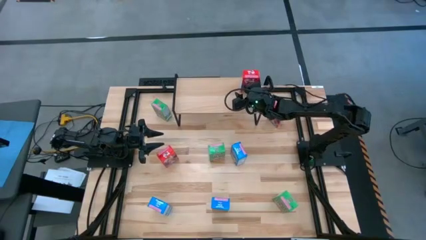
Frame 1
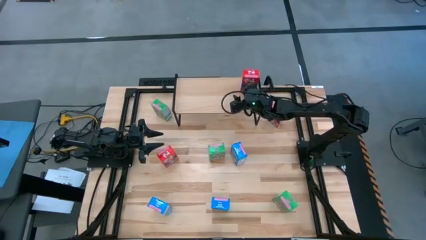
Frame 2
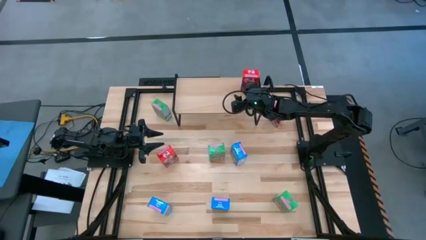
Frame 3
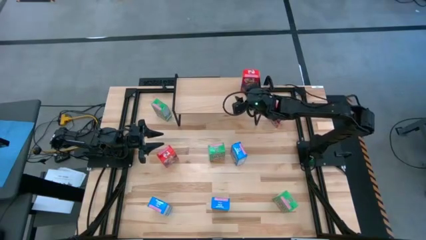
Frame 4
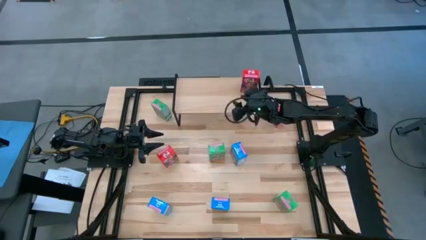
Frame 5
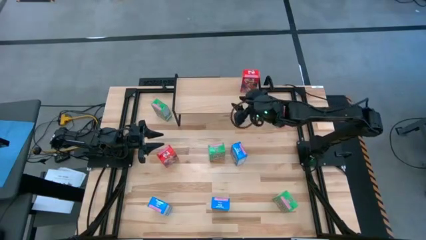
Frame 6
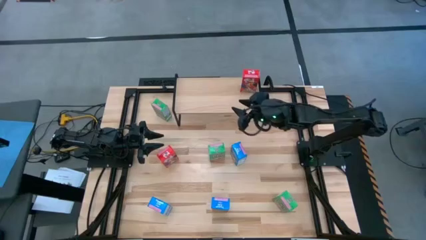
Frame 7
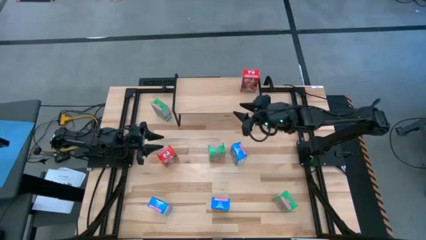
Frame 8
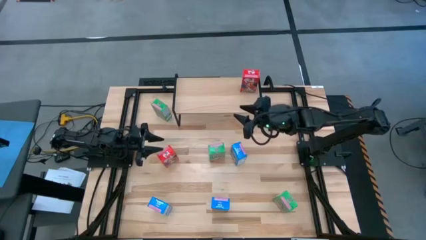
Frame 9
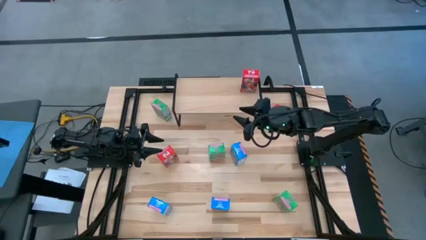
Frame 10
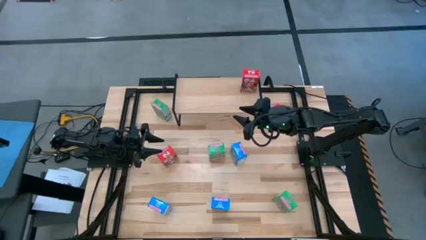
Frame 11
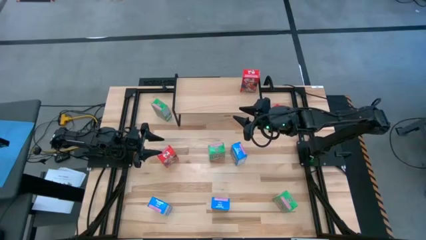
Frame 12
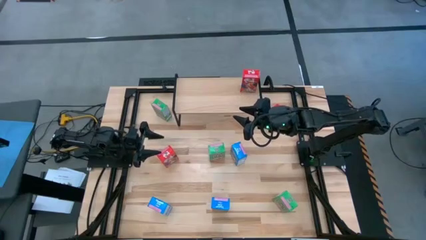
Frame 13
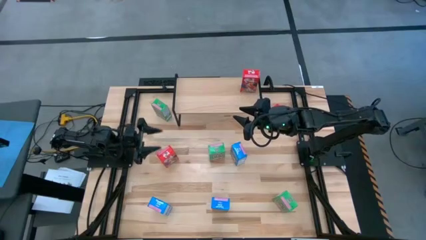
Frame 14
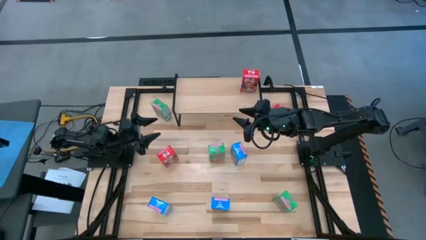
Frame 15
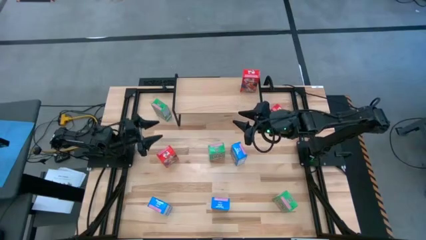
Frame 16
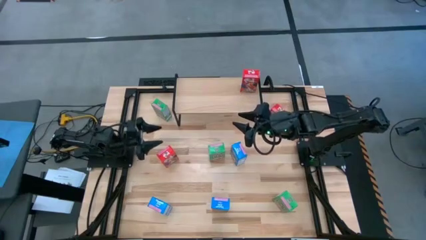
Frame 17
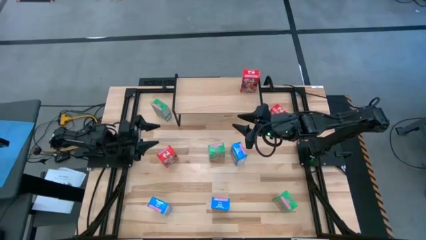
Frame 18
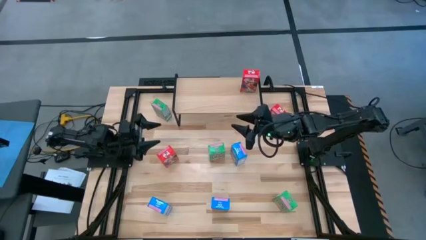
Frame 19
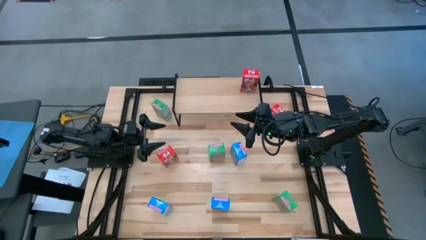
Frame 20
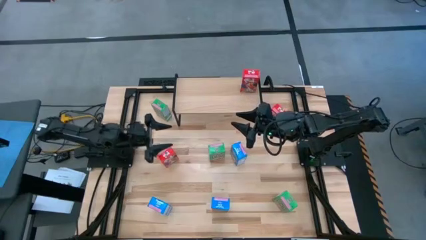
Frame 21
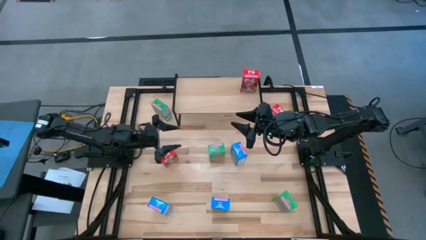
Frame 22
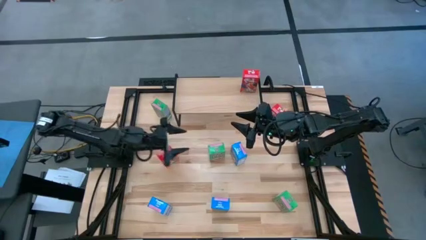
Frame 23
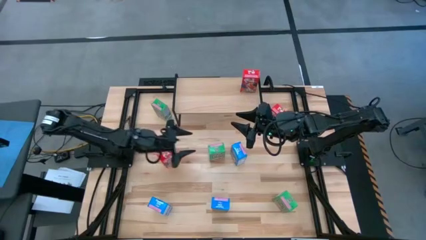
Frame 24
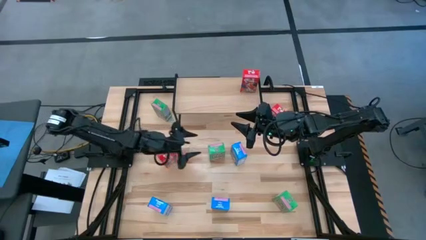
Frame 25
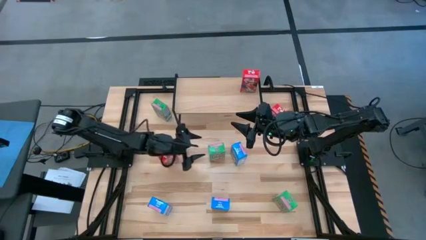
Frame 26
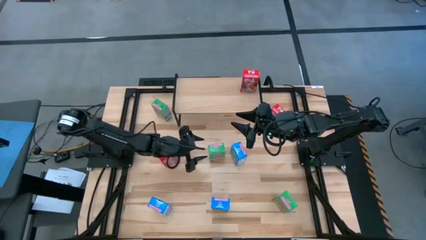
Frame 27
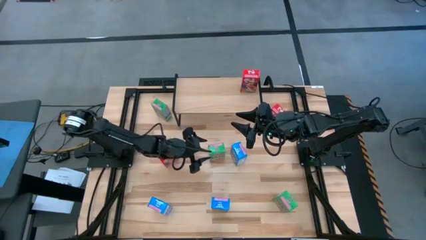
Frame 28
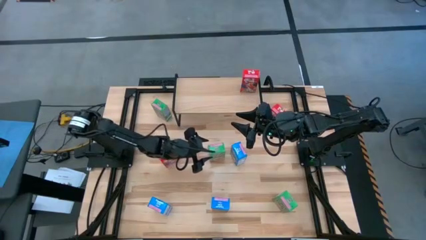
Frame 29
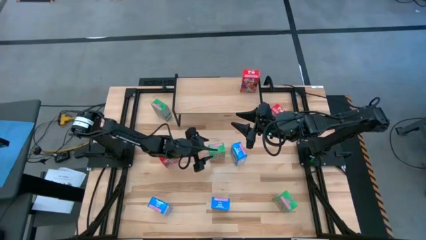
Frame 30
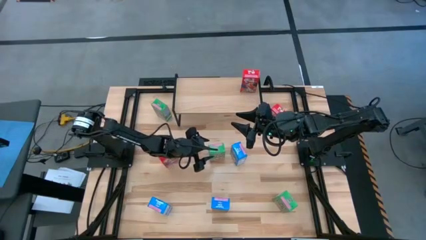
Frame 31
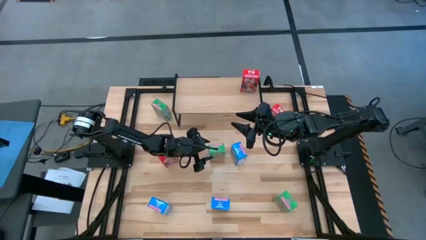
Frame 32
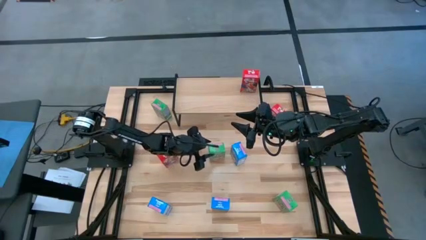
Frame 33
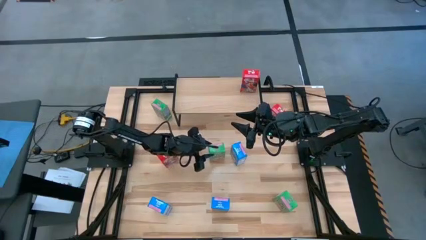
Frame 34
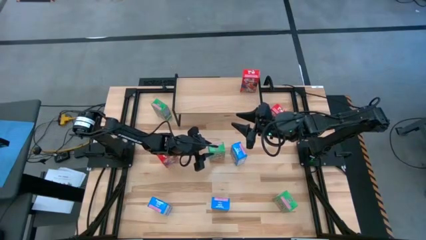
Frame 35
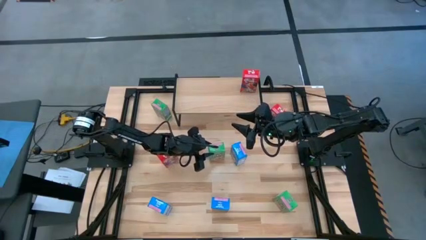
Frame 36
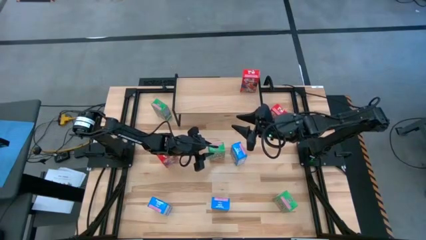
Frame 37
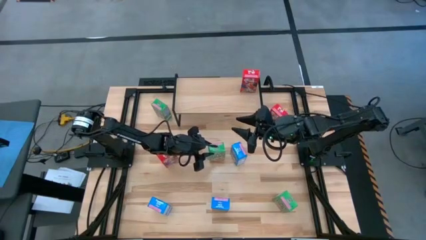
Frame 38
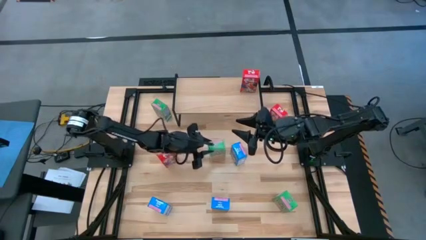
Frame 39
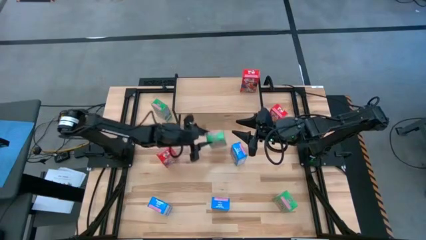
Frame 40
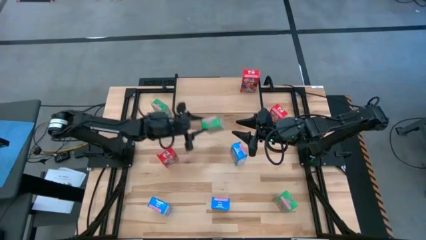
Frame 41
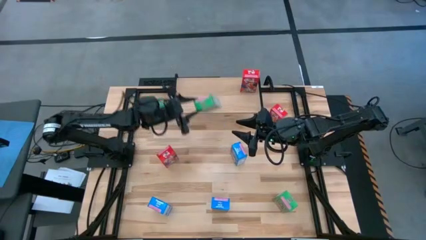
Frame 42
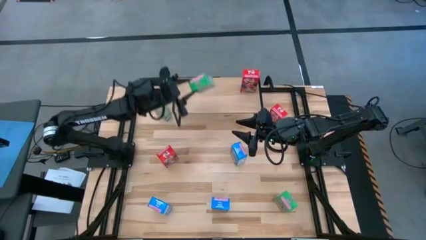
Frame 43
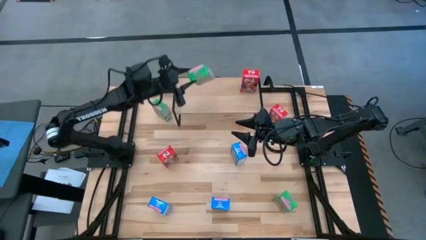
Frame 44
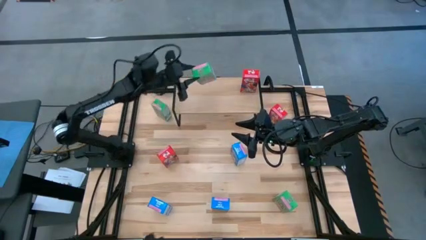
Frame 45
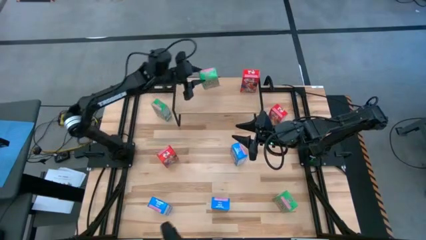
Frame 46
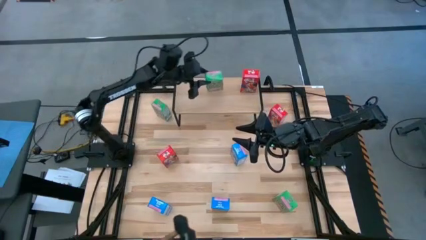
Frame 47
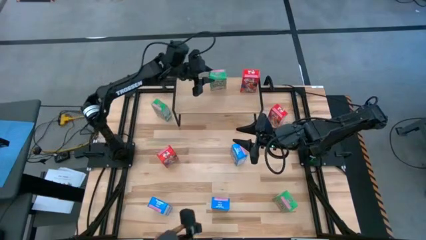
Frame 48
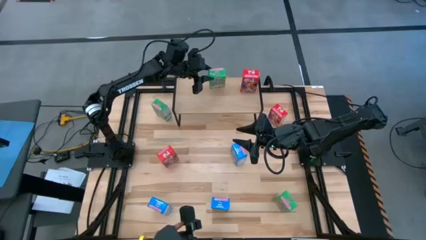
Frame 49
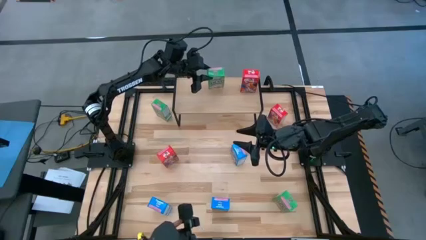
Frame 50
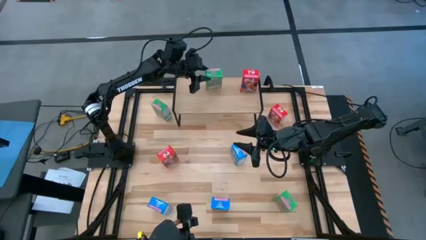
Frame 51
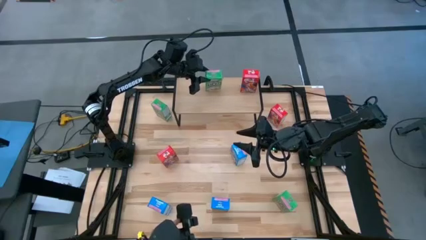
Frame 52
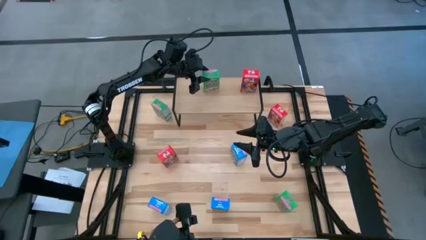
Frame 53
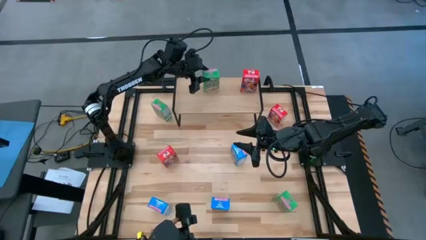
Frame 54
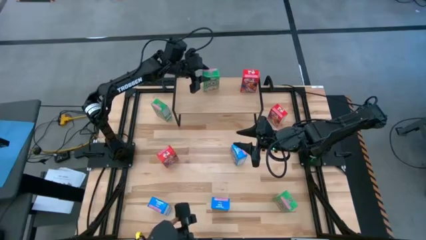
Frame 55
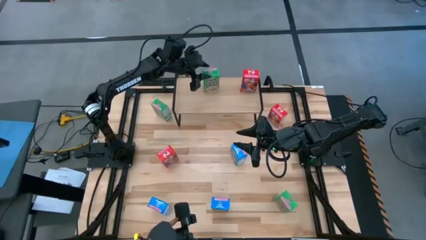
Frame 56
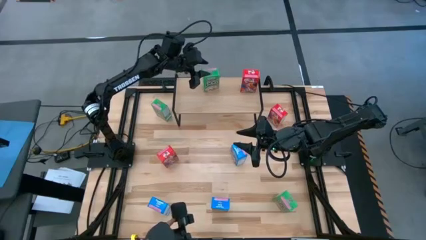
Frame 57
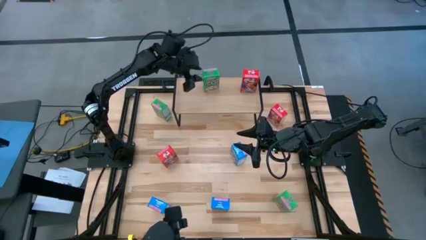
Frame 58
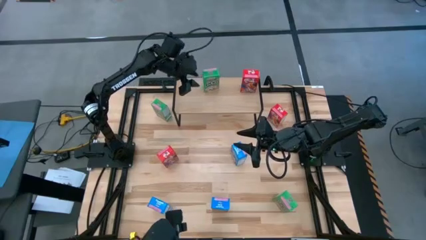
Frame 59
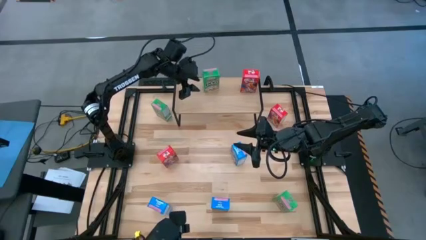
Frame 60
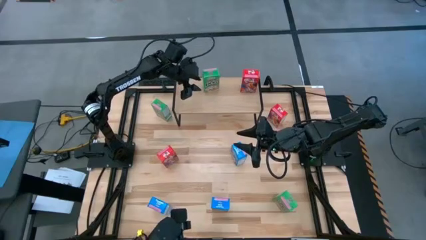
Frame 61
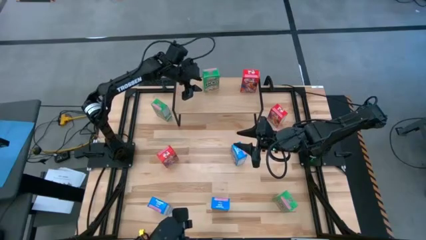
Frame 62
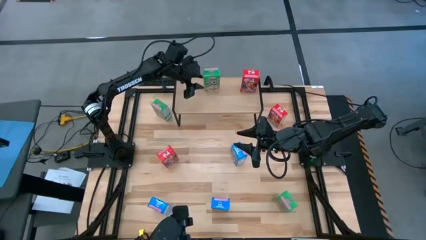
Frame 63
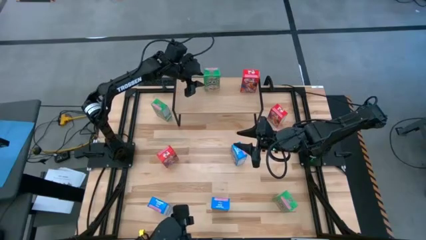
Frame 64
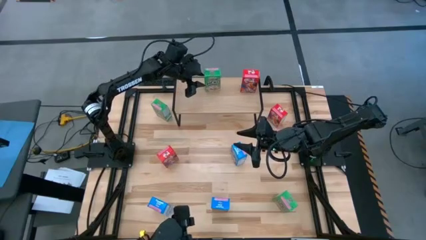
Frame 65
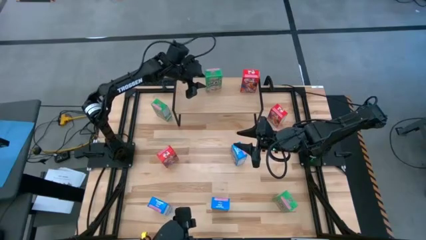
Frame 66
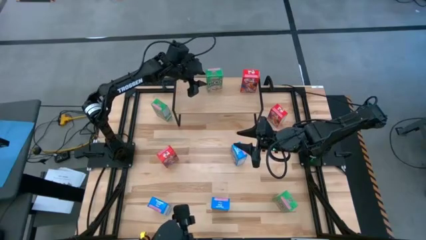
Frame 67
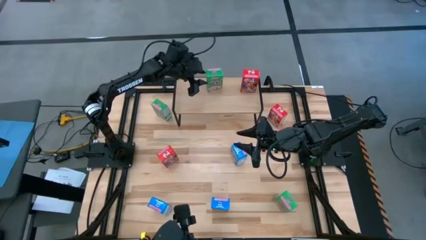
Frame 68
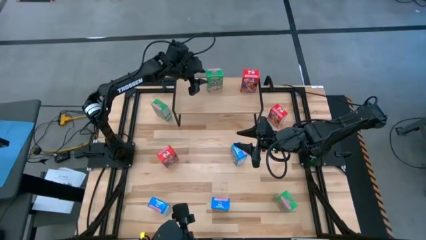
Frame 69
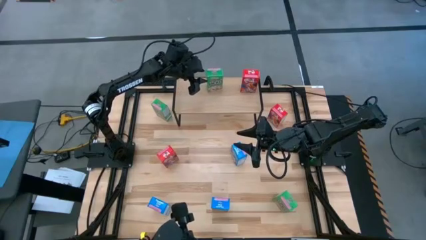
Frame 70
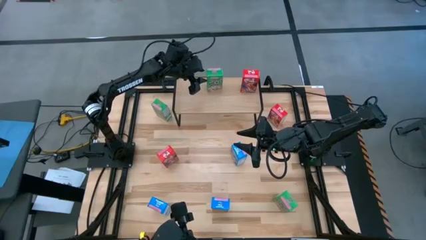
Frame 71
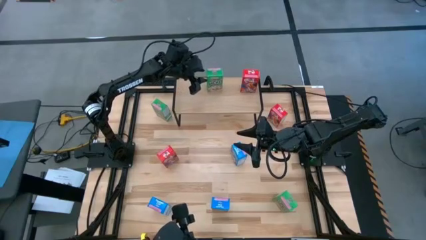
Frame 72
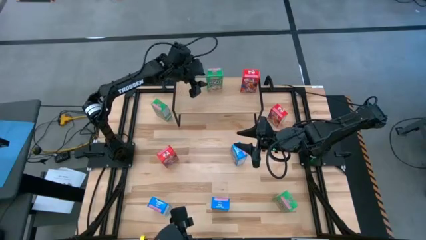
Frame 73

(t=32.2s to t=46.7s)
Task: Stack cereal on shelf
Put the middle green cereal box on the shelf

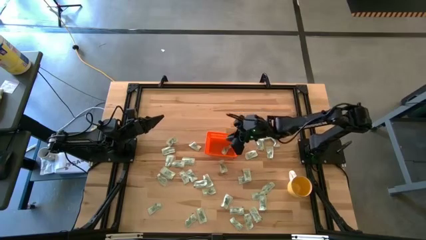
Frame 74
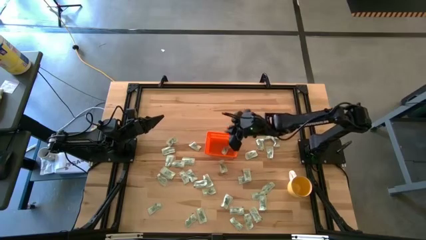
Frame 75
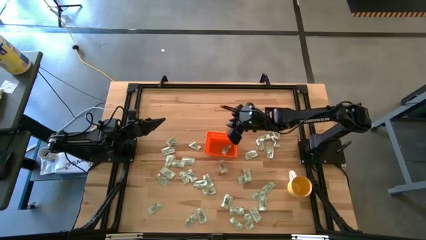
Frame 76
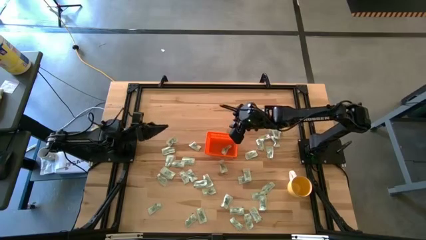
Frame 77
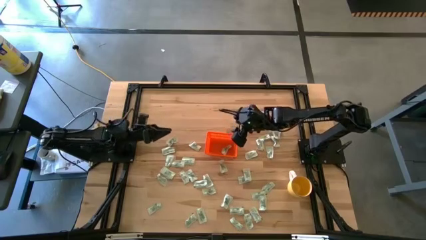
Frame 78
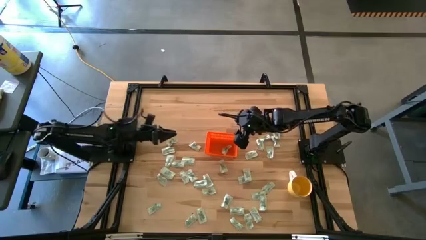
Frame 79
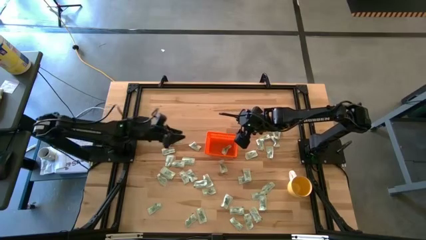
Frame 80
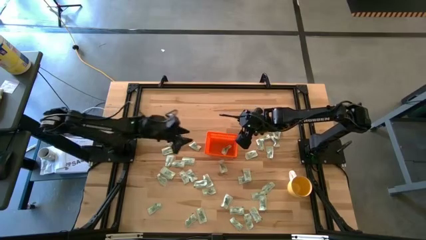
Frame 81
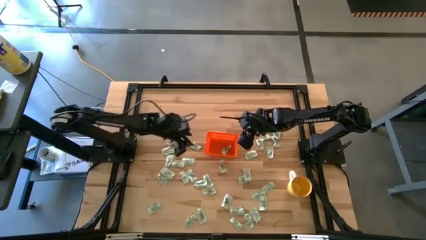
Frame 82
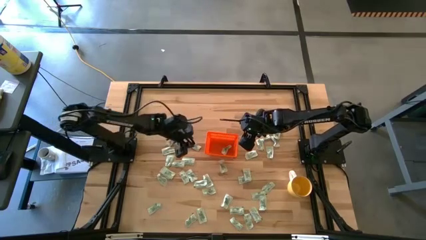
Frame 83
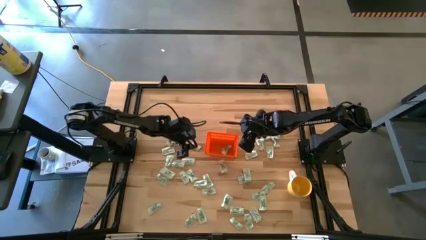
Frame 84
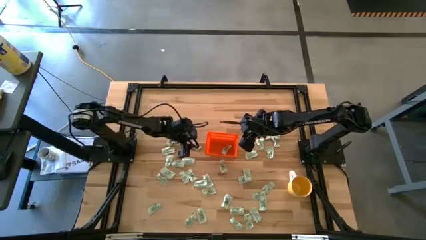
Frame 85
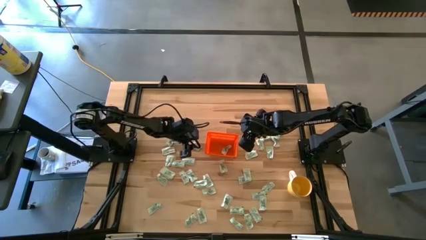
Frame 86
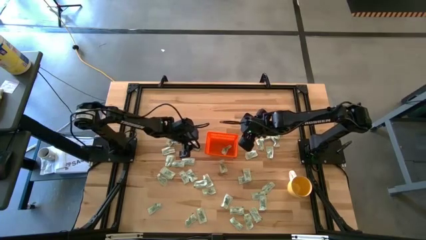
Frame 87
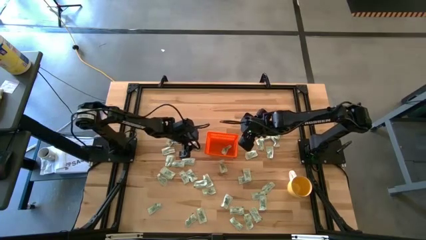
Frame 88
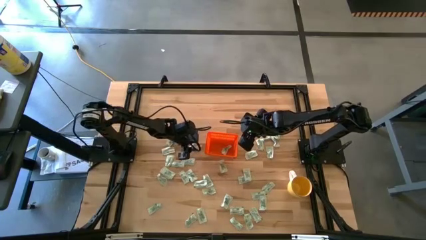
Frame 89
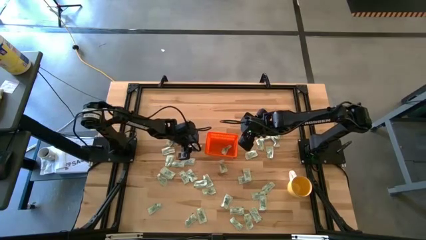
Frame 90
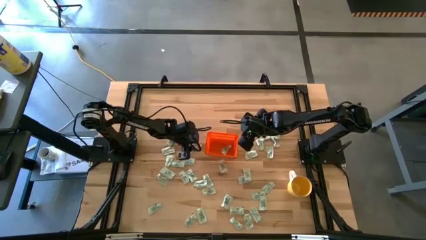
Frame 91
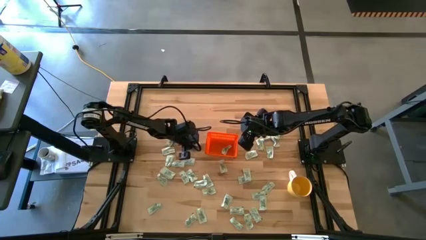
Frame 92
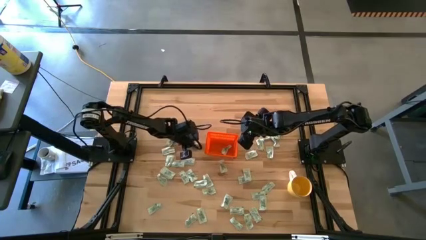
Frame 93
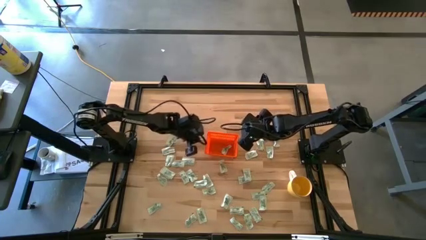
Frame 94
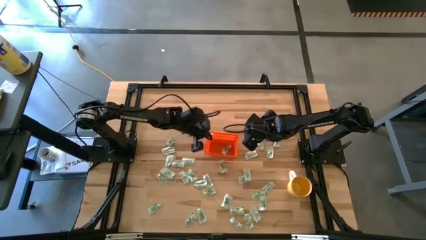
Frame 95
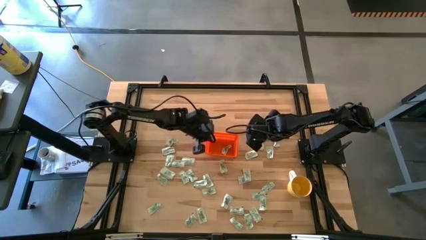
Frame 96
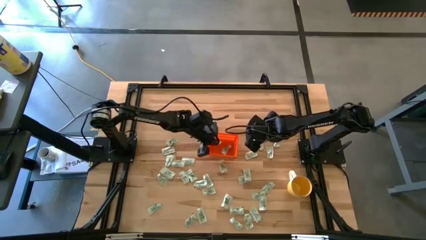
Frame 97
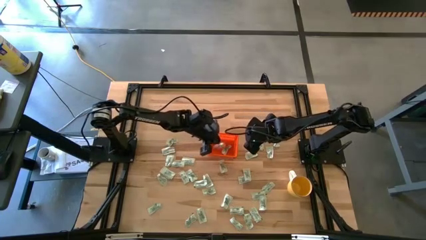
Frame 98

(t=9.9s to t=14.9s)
Task: Pick and place Stevia / Truvia into bins
Put the light green stevia packet into the orange bin
